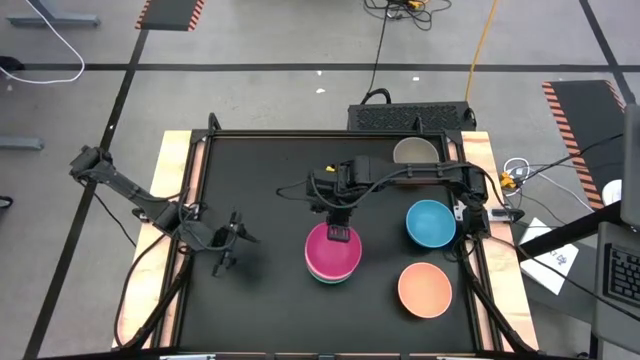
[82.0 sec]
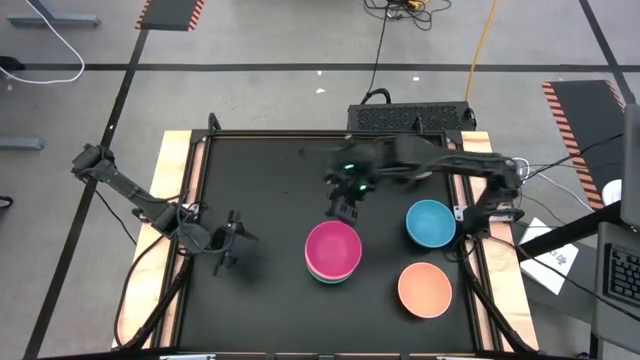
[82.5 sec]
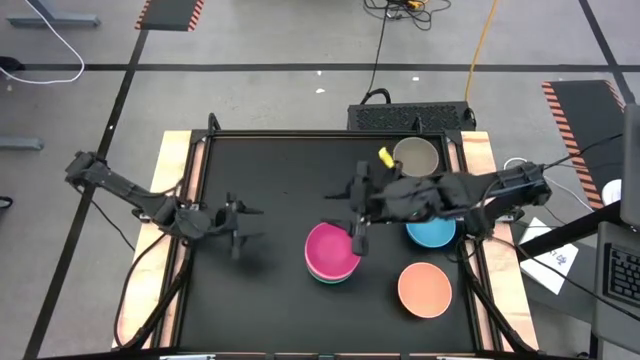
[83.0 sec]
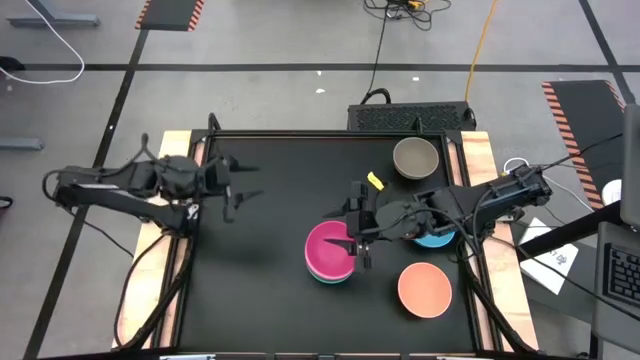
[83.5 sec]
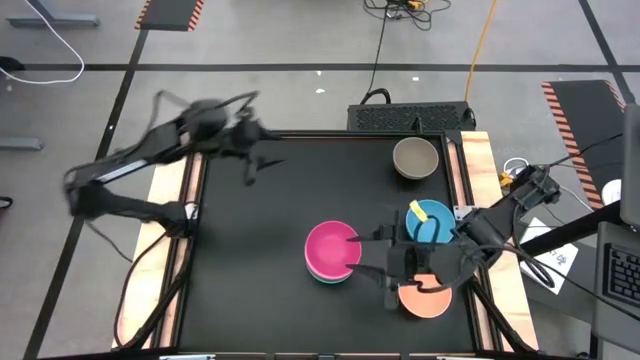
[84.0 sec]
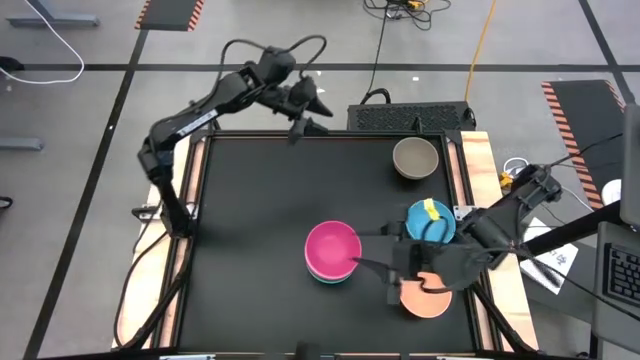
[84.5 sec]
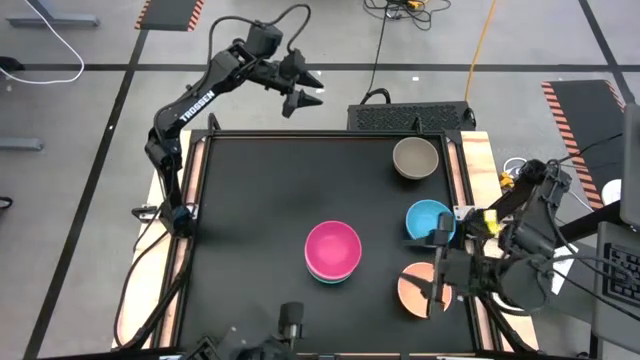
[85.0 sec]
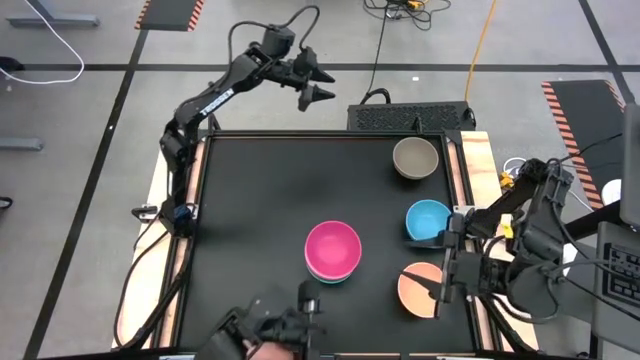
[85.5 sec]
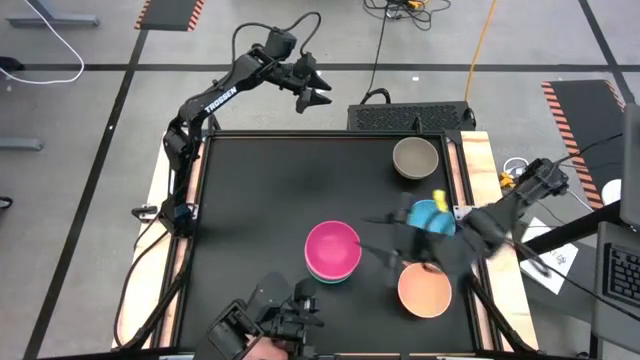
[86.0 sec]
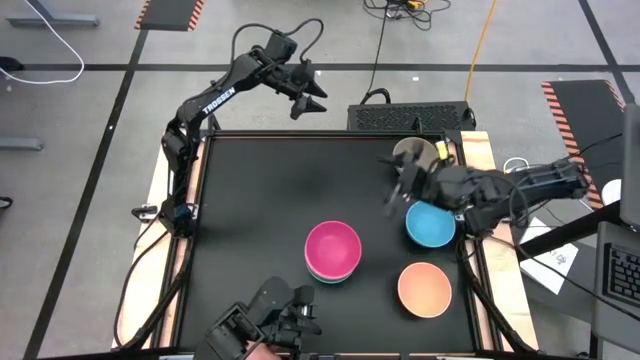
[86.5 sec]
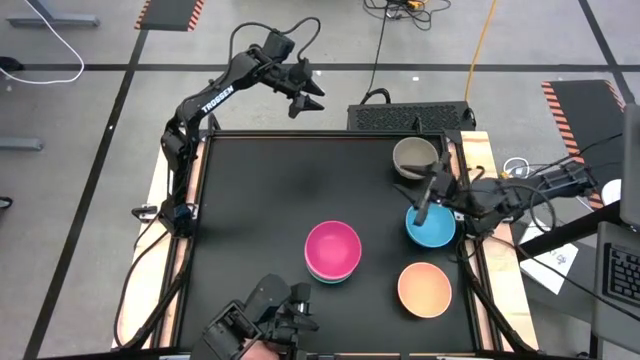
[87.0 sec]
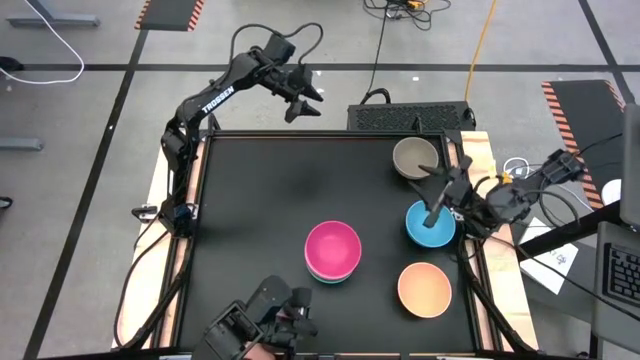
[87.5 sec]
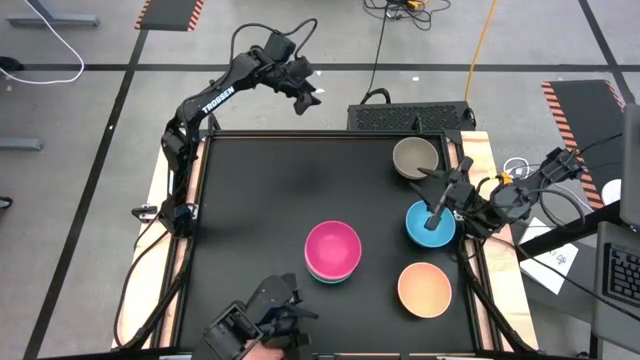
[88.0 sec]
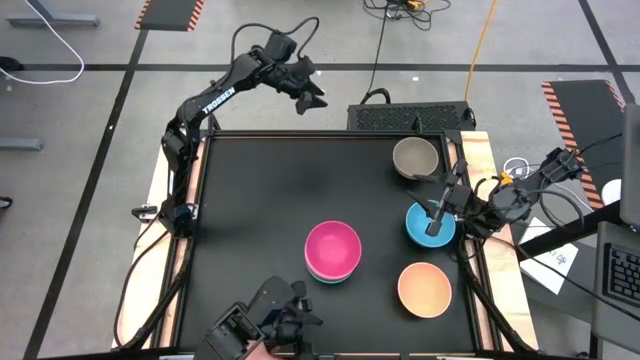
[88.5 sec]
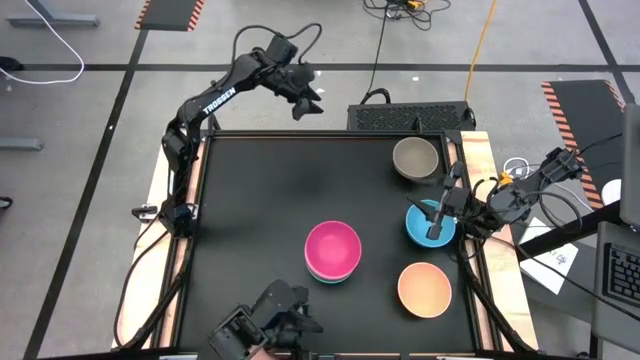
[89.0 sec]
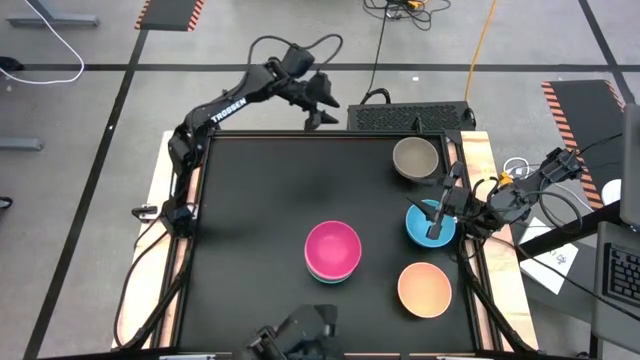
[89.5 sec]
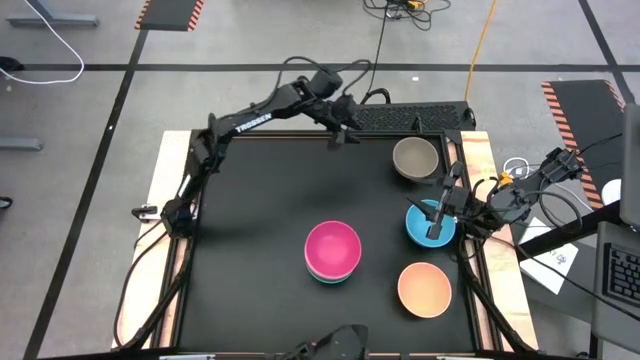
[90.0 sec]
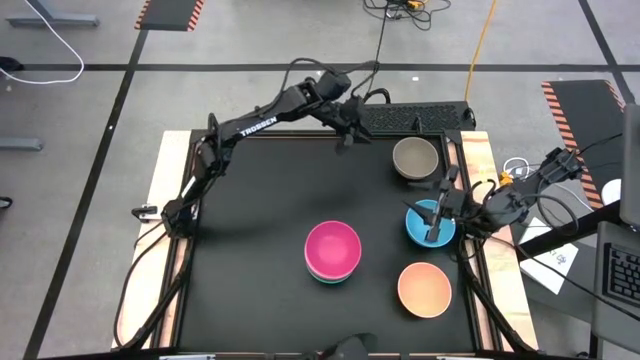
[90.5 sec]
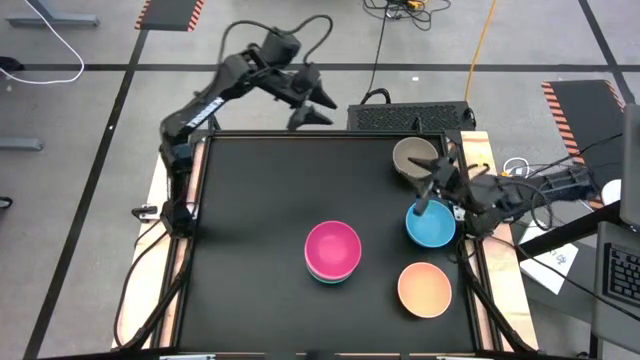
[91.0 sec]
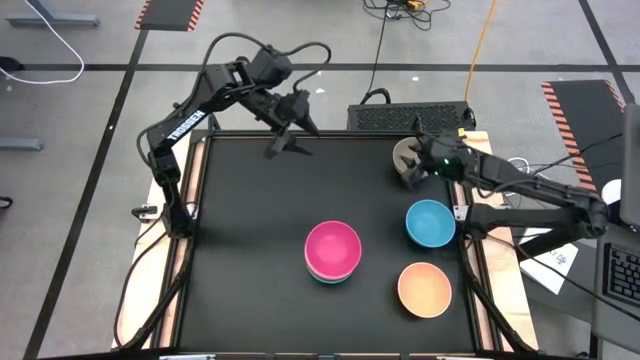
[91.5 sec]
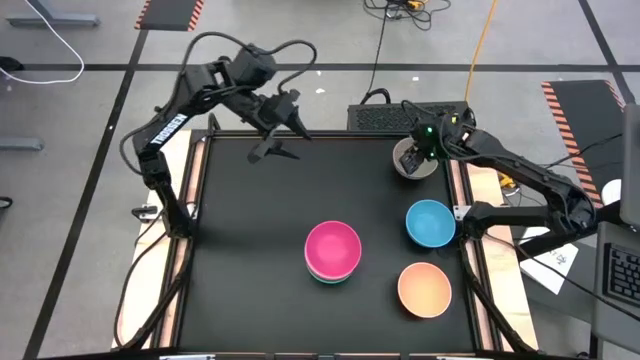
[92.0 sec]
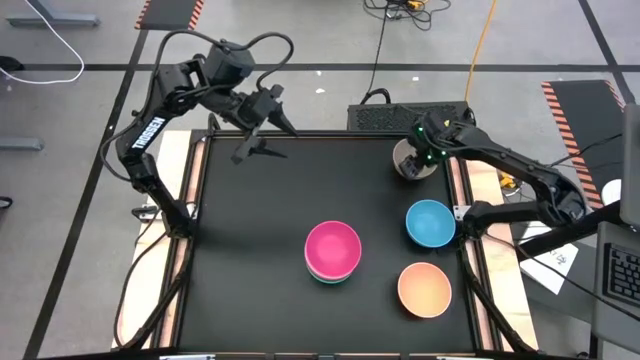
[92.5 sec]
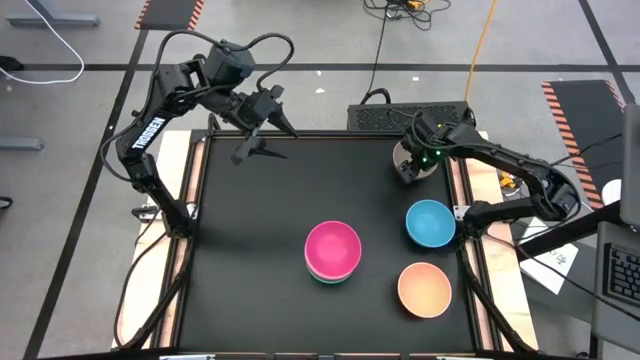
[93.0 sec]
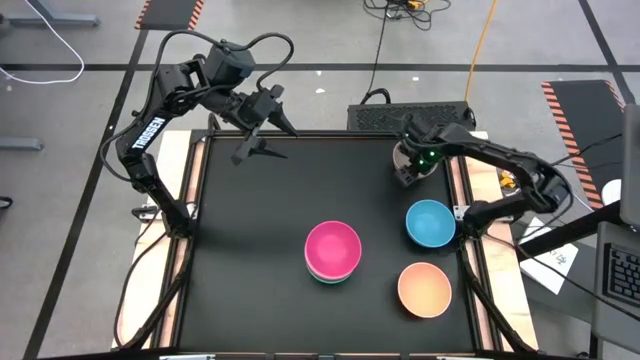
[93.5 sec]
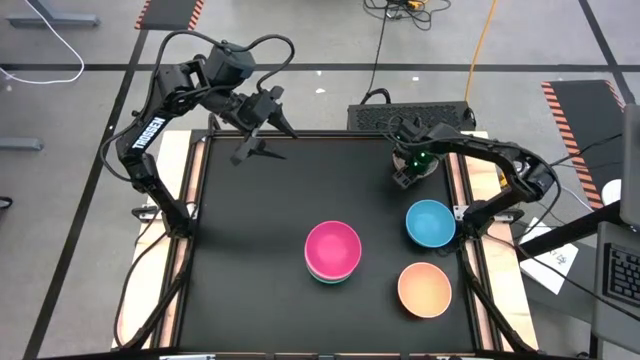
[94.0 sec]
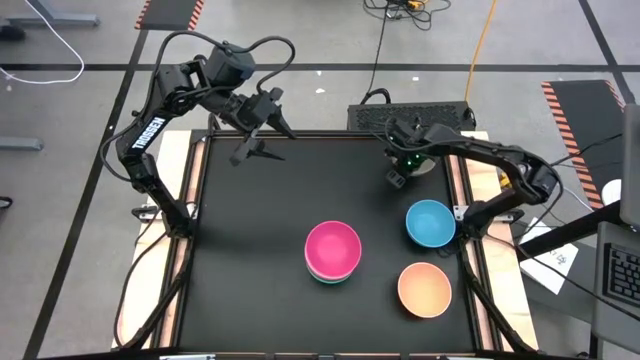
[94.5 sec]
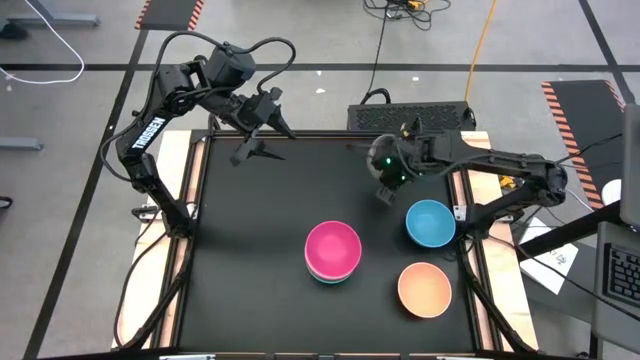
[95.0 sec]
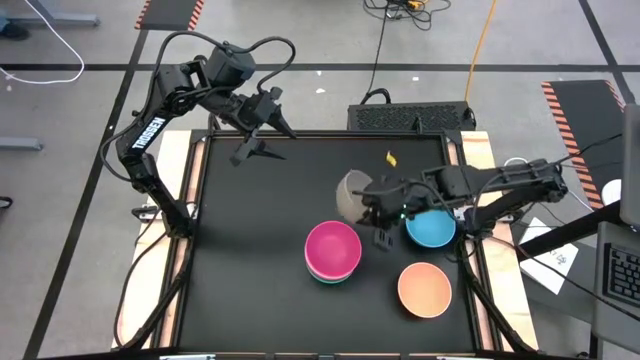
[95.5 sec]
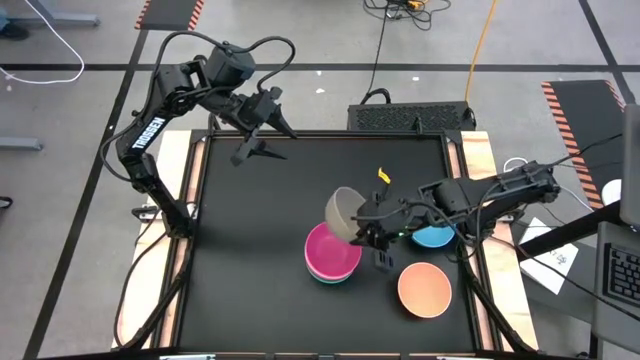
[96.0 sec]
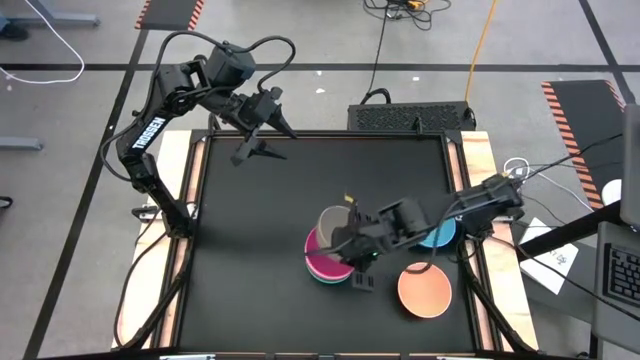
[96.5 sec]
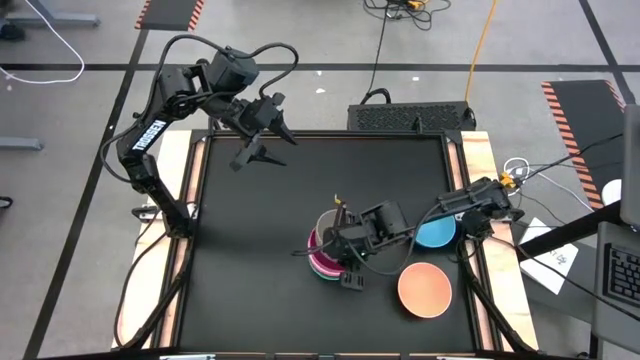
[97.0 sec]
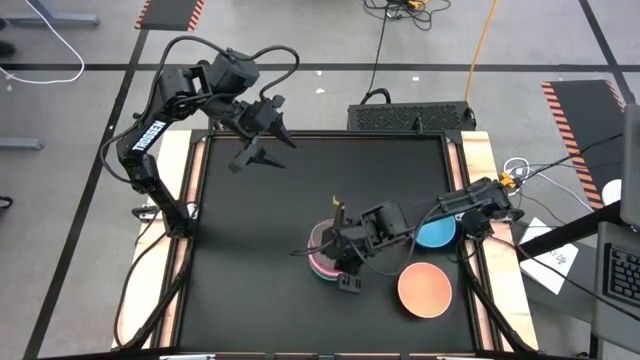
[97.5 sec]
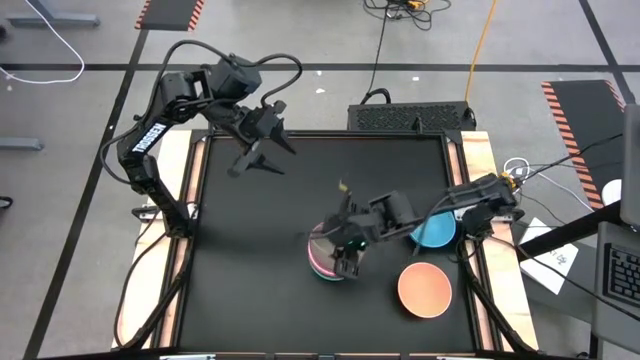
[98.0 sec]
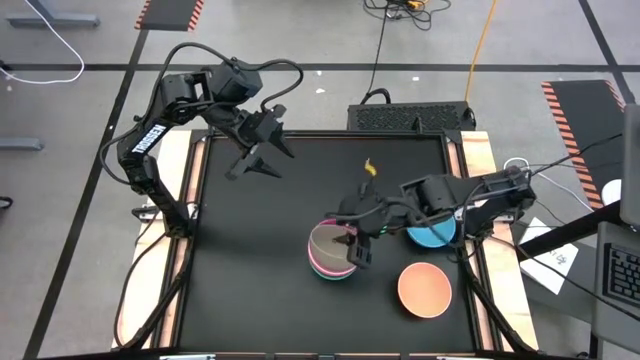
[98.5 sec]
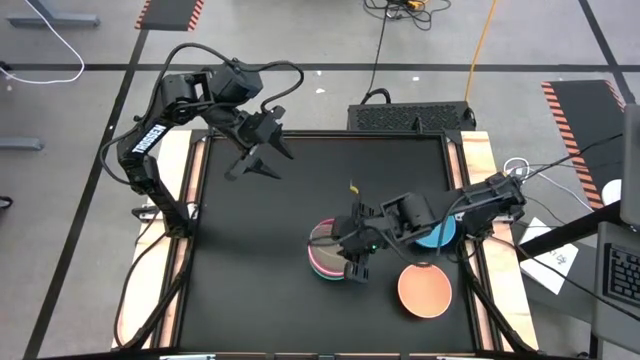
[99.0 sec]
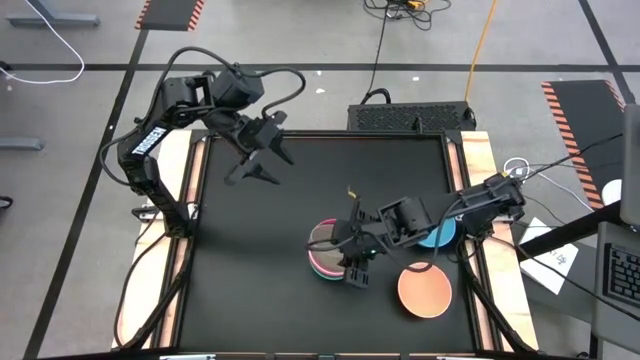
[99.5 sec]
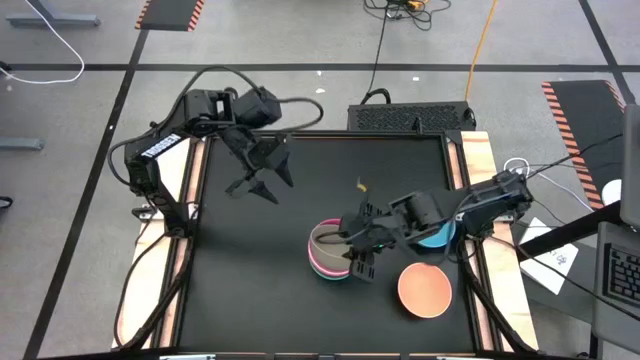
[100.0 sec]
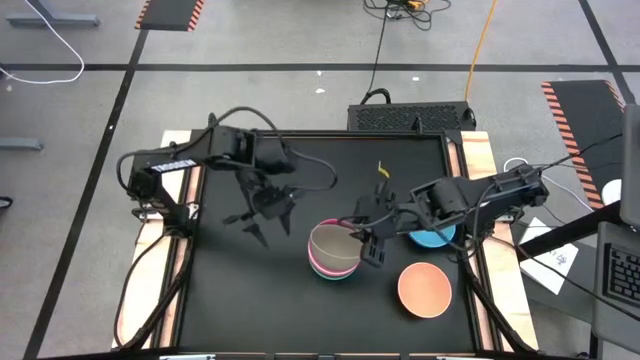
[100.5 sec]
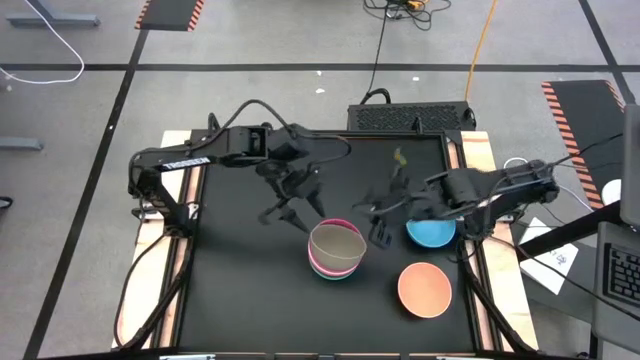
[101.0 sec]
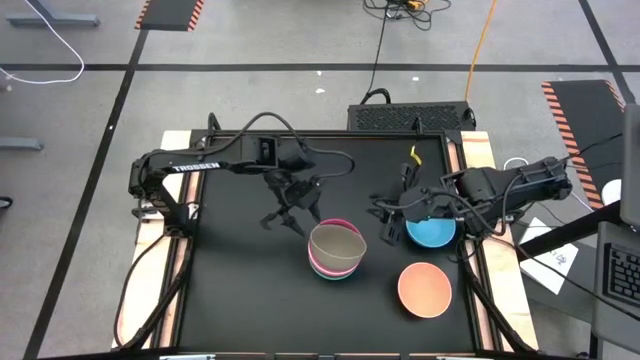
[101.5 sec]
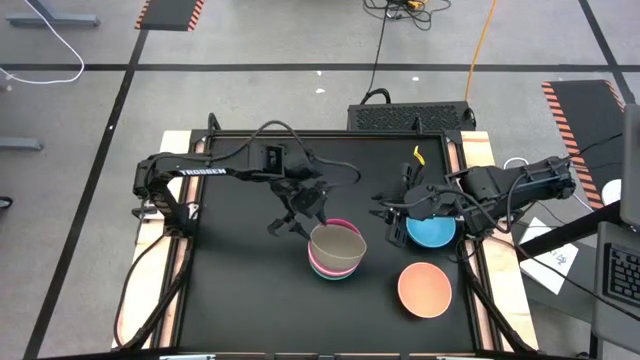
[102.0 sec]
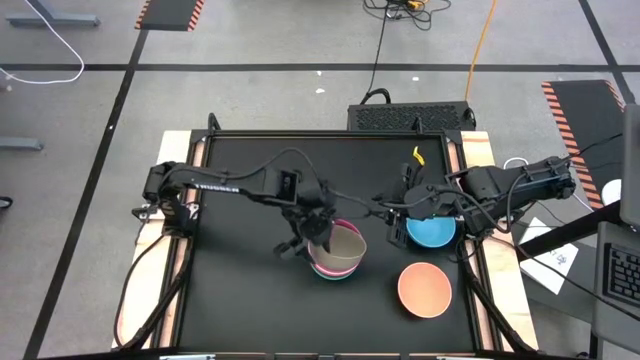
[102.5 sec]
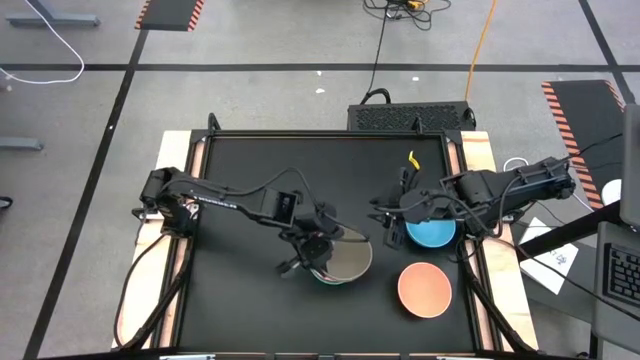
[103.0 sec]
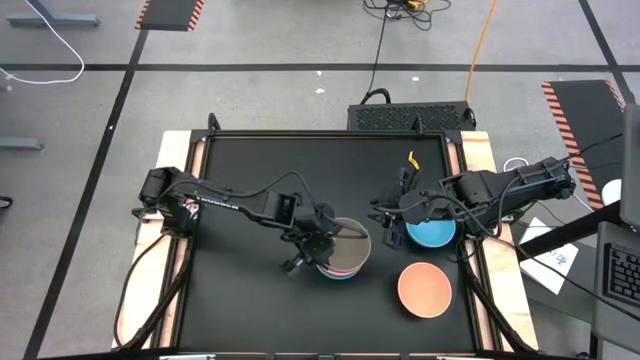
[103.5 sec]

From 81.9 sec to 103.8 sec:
Task: Nest bowls inside each other
Stack the gray bowl on the pink bowl
